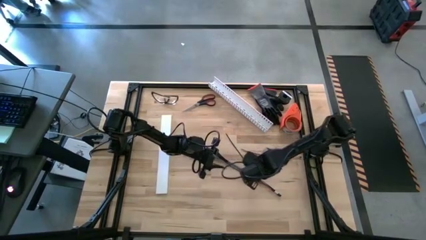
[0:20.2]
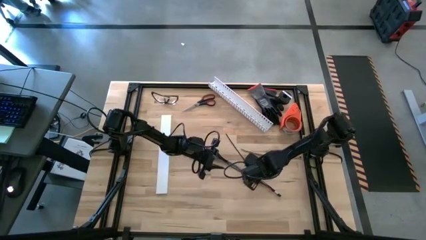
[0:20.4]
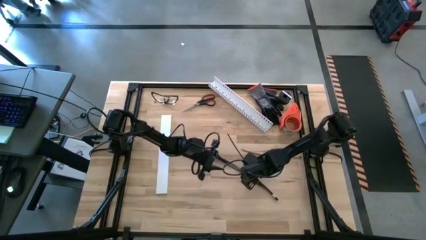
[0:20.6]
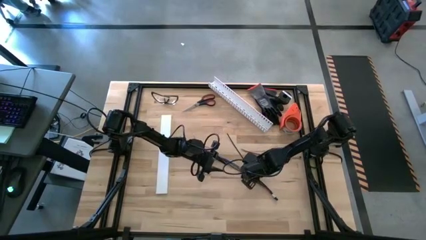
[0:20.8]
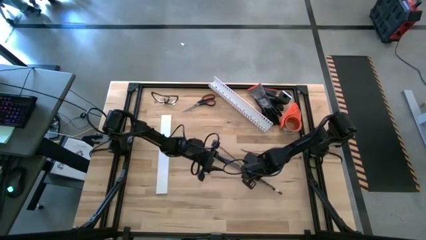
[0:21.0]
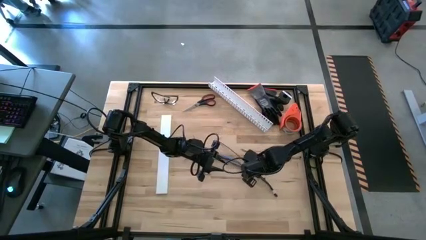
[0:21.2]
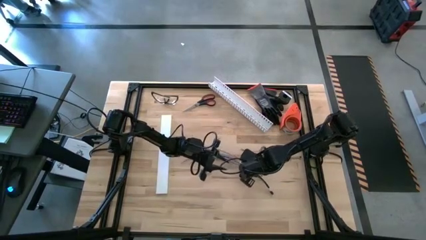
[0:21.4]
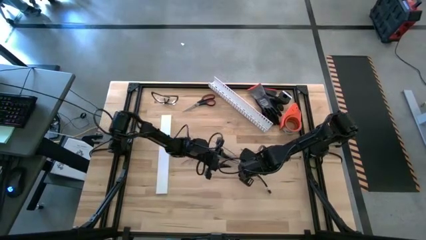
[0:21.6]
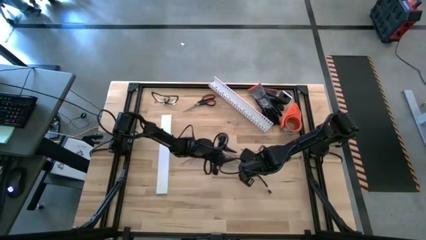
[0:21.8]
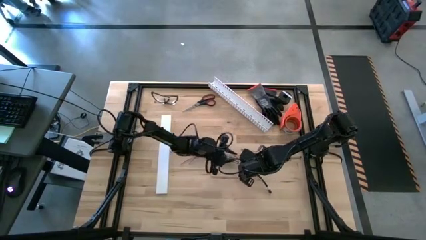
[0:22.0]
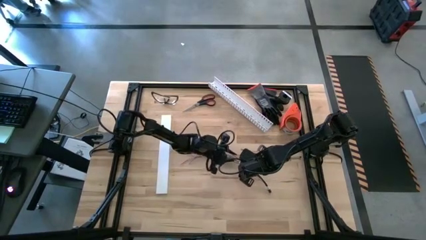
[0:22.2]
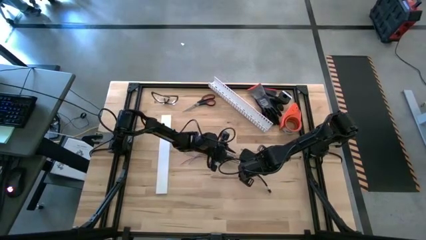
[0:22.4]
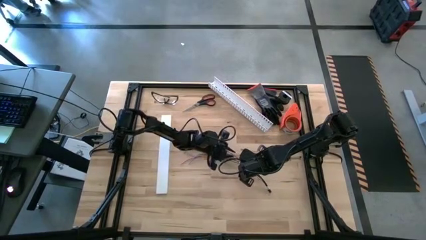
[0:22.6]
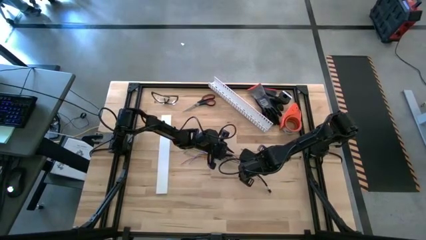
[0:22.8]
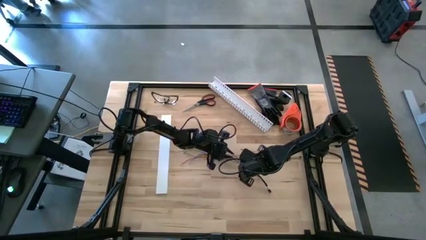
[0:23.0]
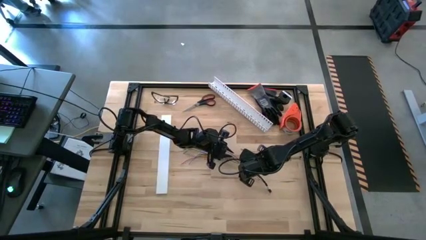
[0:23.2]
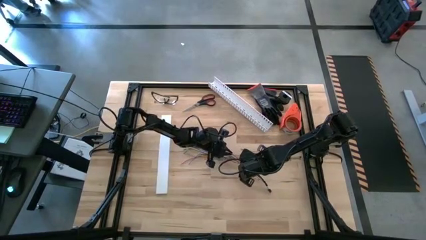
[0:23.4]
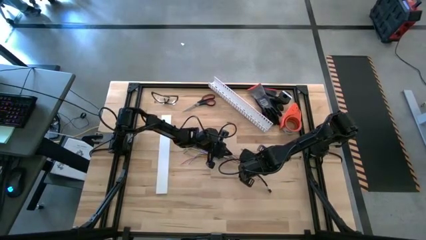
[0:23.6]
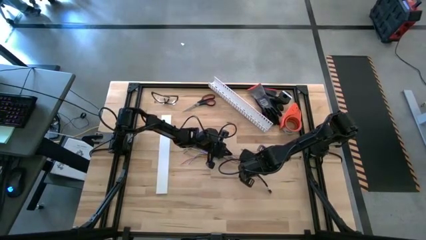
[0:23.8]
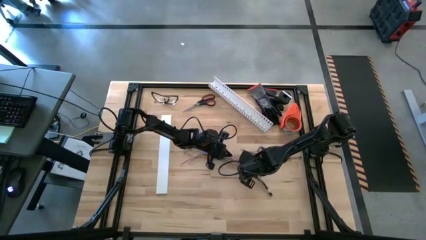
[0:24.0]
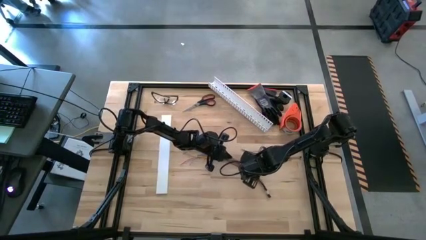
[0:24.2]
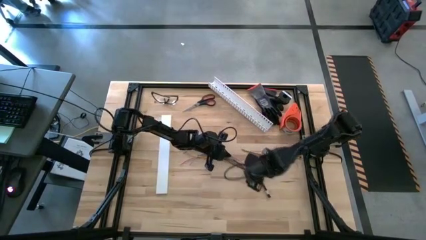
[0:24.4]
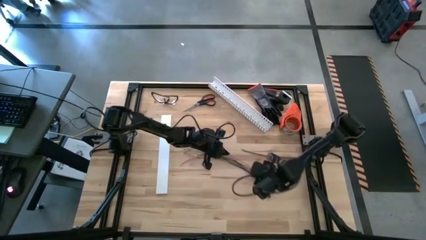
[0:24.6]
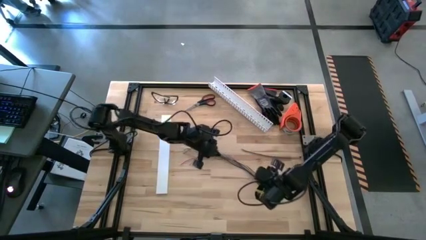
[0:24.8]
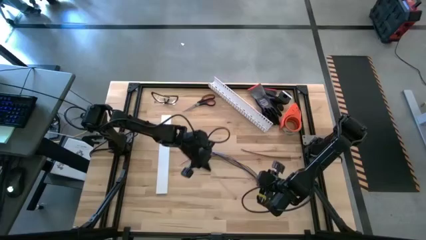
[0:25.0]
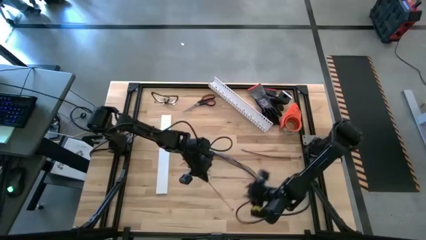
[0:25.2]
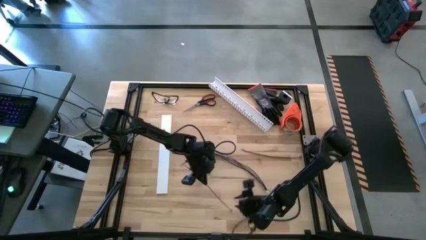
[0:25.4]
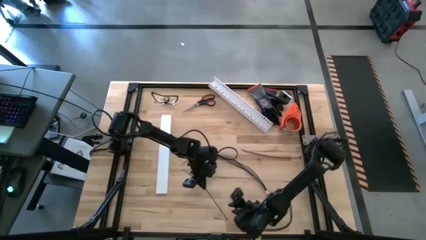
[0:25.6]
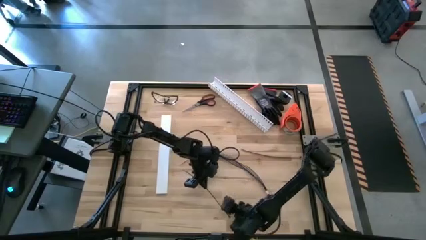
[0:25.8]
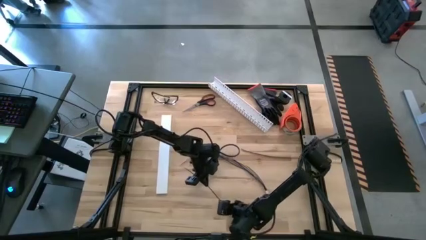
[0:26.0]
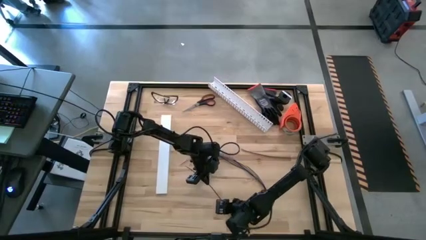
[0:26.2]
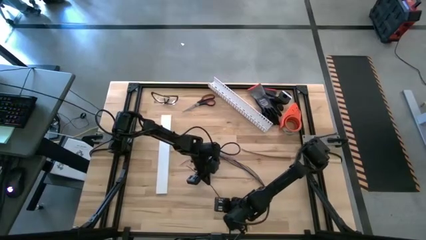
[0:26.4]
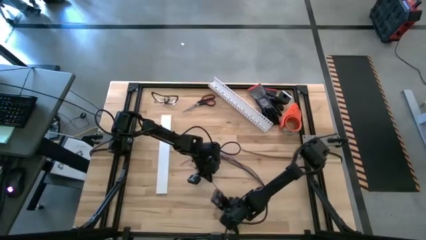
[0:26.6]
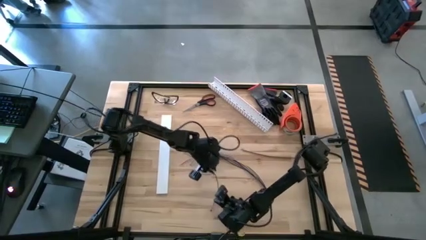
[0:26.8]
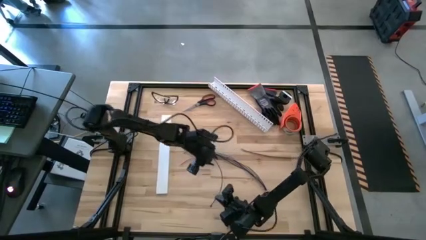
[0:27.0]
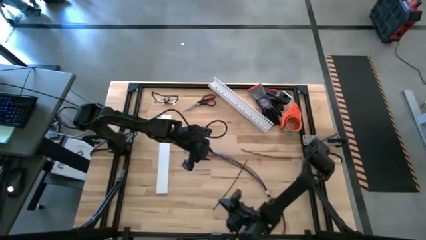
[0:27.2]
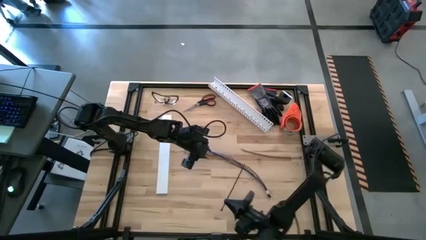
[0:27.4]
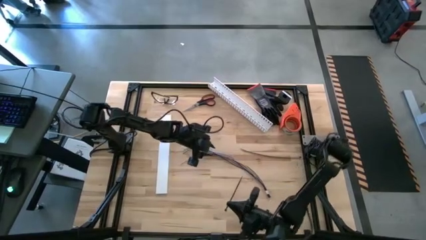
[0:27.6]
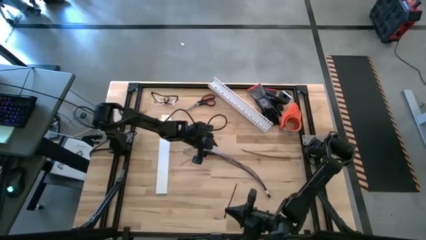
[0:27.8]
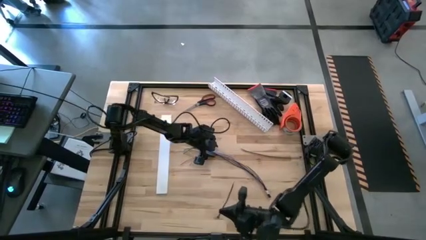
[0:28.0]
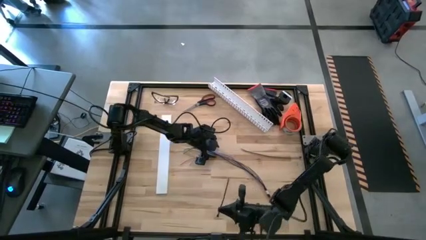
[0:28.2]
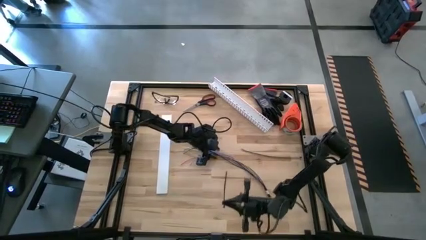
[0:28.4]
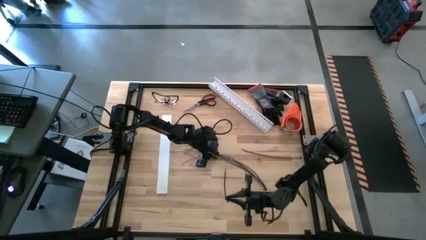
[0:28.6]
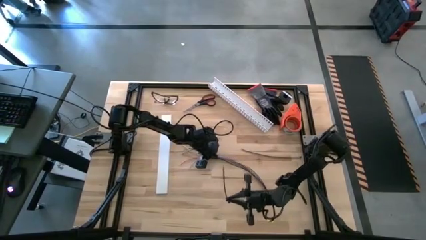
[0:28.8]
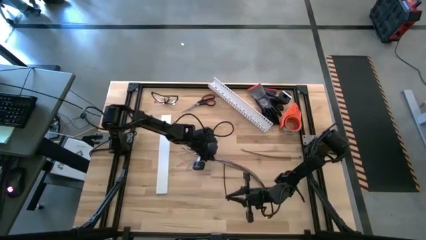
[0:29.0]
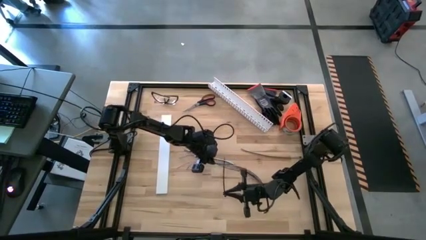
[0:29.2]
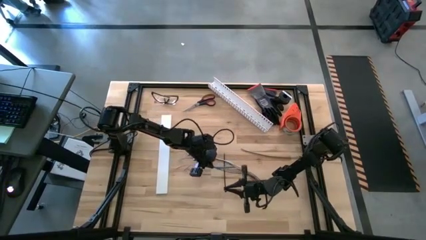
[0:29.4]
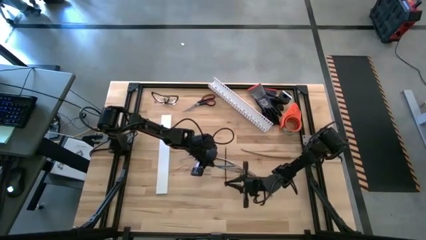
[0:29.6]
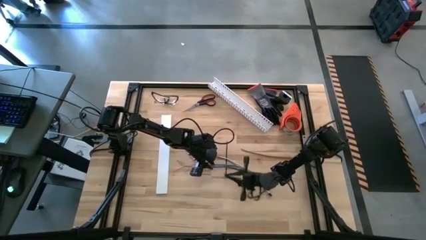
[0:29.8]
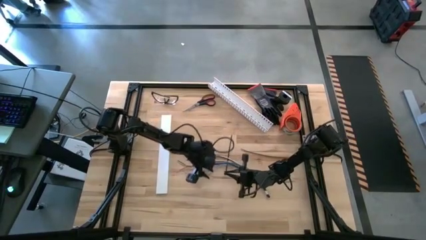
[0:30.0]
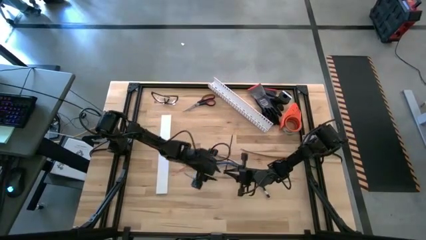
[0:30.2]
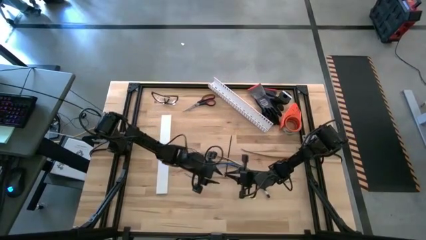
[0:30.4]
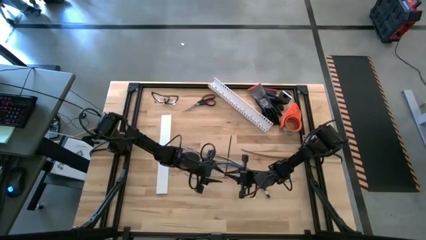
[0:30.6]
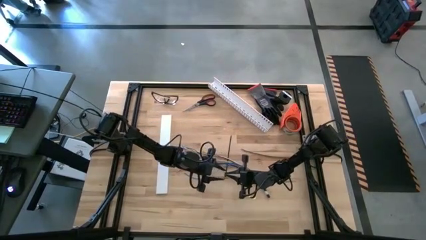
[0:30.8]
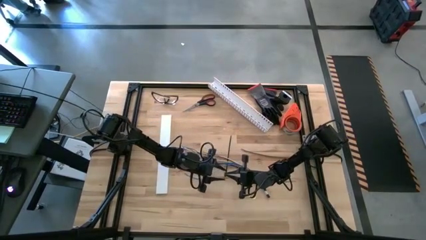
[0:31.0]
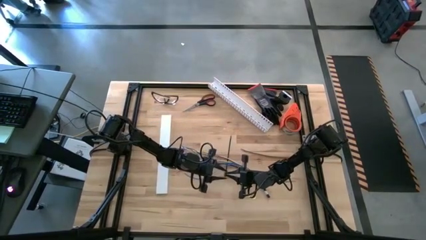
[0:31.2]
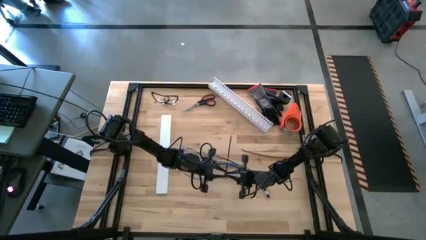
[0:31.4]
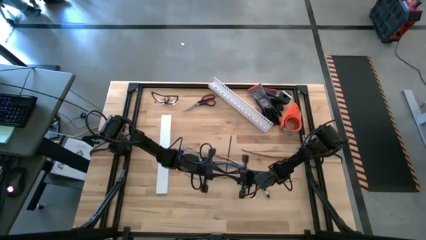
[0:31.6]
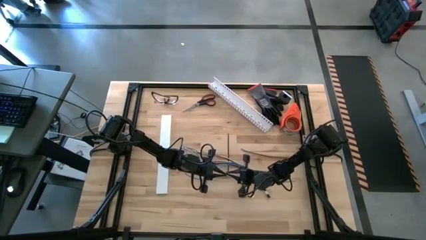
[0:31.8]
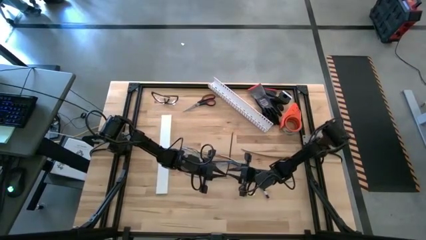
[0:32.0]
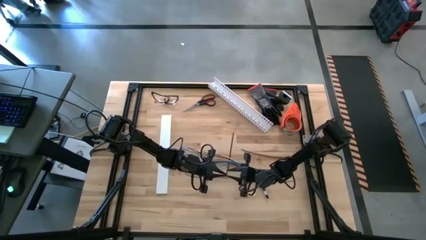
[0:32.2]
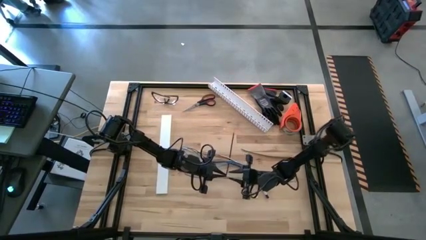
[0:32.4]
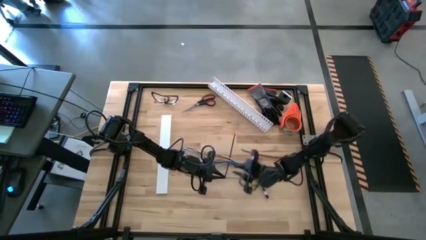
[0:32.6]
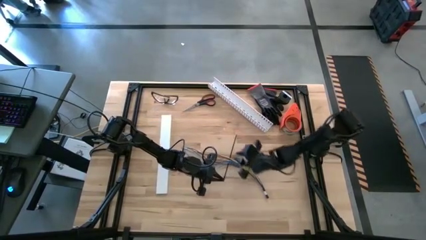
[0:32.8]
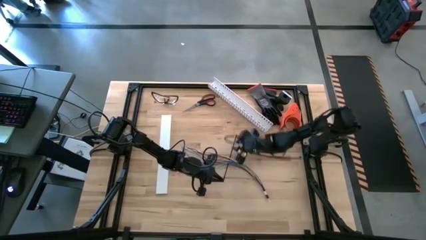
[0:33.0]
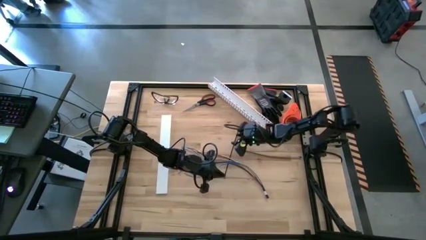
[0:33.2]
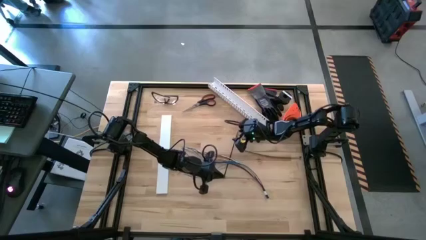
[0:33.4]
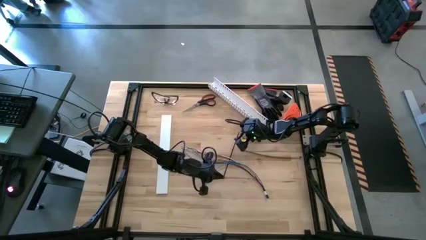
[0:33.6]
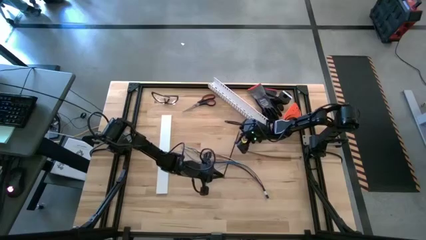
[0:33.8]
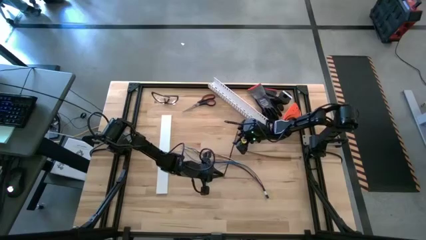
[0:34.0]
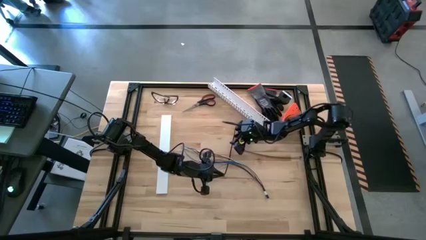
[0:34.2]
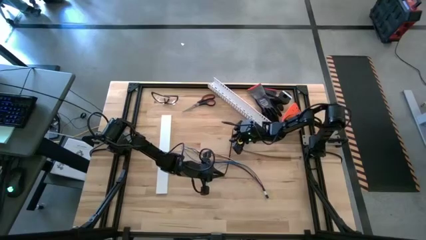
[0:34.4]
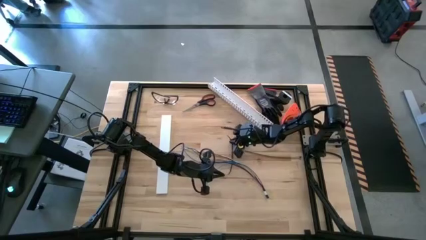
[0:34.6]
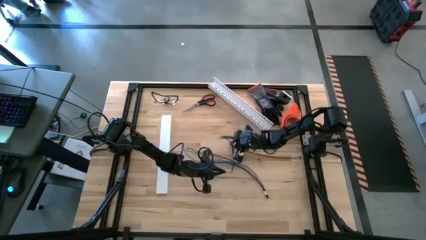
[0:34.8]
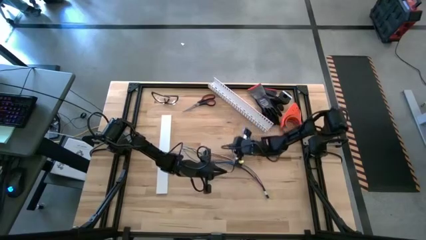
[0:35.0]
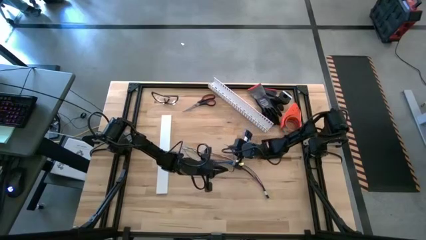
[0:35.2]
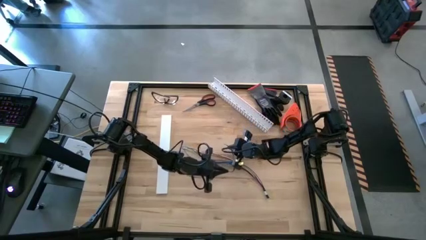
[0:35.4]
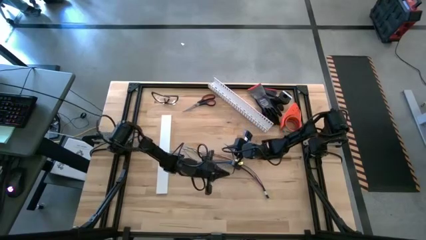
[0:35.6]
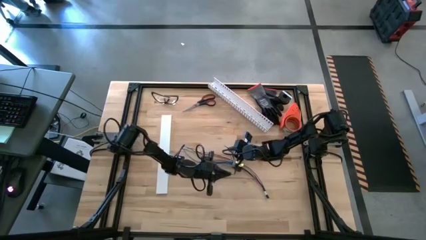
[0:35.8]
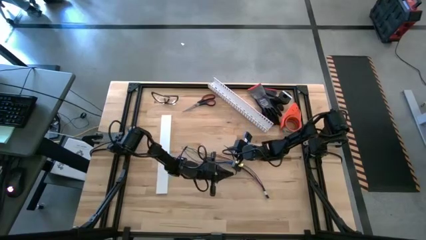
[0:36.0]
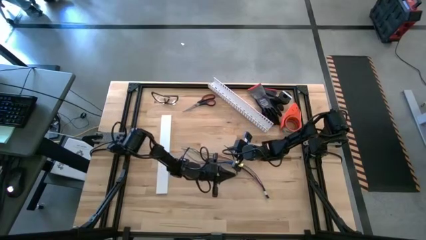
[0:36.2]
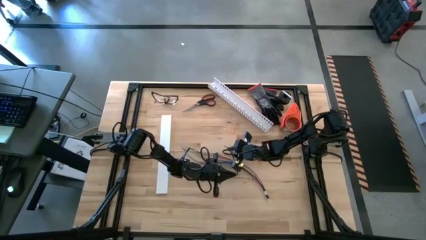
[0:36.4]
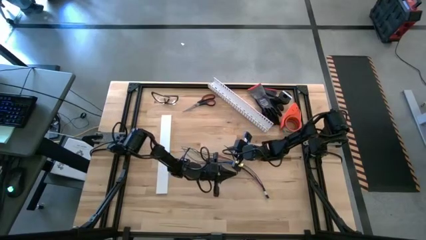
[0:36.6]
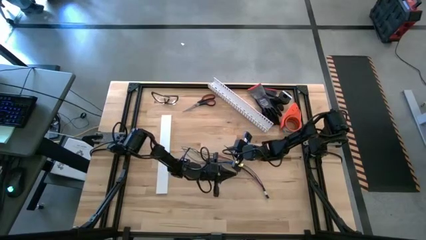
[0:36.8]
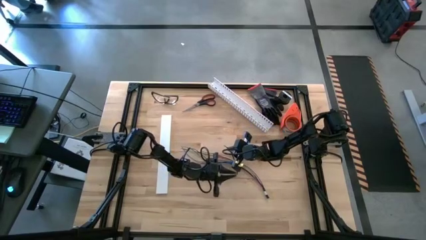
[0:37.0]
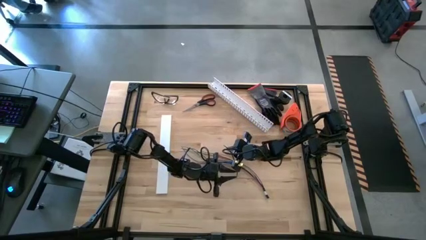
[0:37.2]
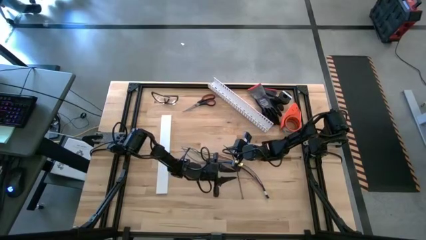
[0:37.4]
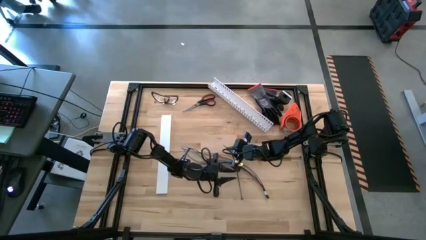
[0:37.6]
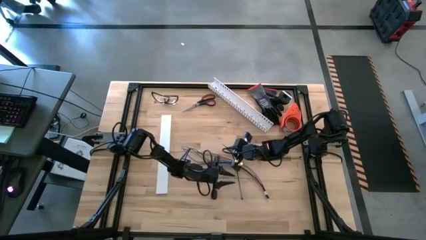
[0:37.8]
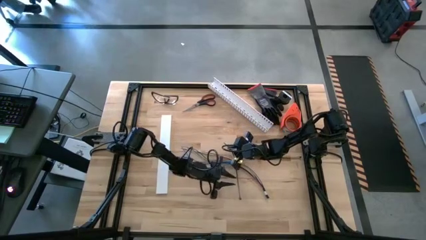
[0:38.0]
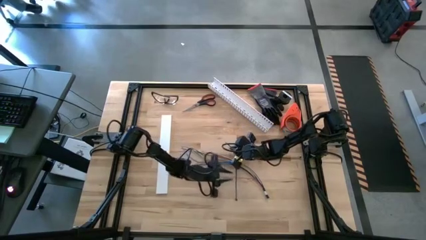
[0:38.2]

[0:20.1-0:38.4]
Task: Ziptie cables
Wrap the bottom black zip tie on the cable wires
